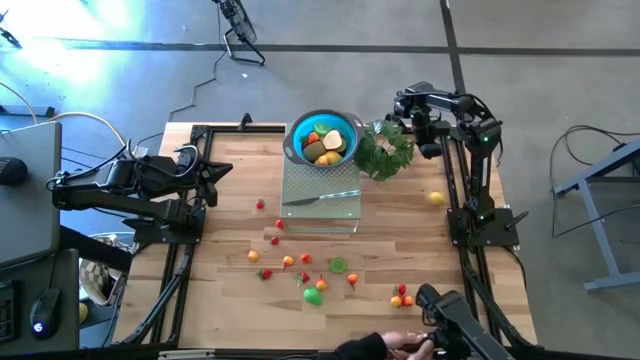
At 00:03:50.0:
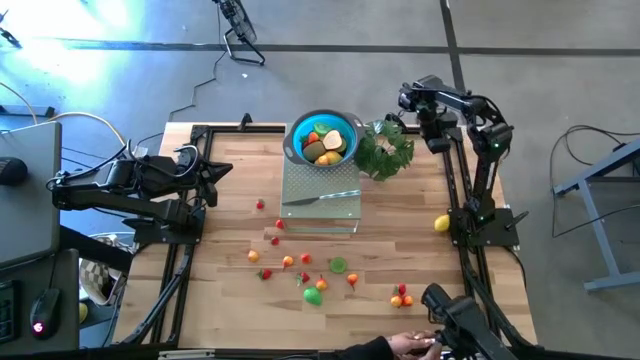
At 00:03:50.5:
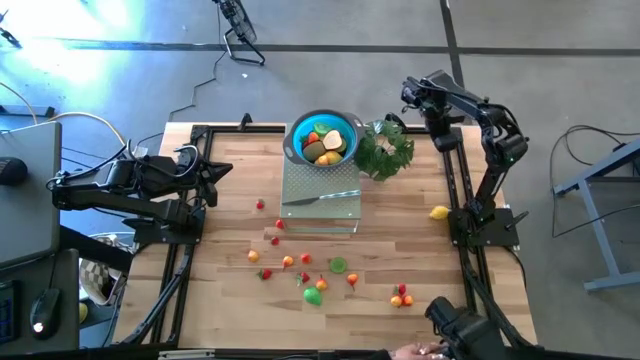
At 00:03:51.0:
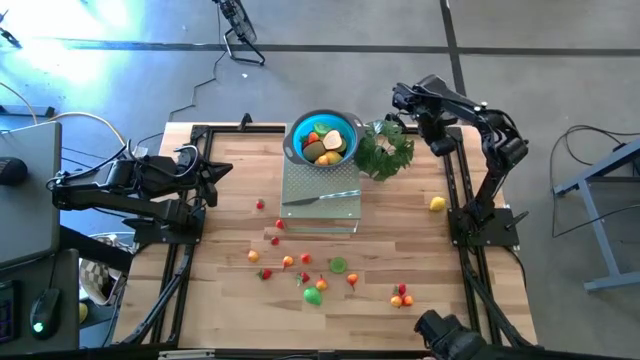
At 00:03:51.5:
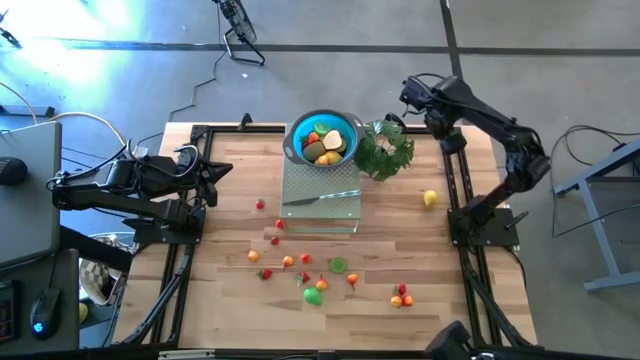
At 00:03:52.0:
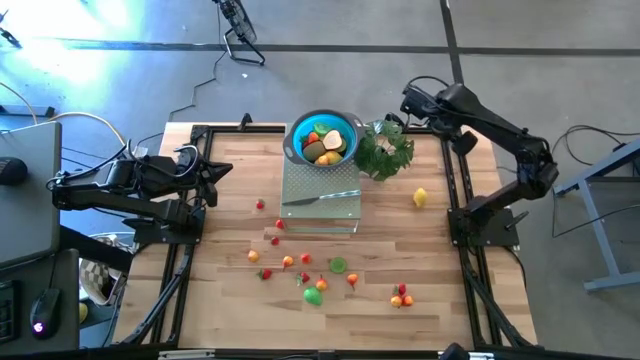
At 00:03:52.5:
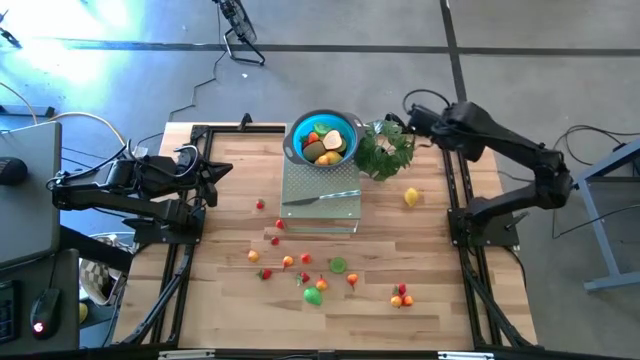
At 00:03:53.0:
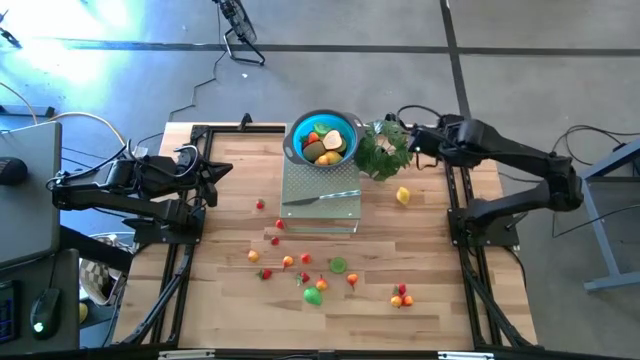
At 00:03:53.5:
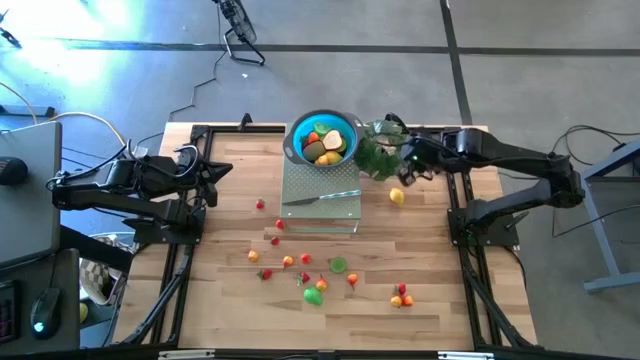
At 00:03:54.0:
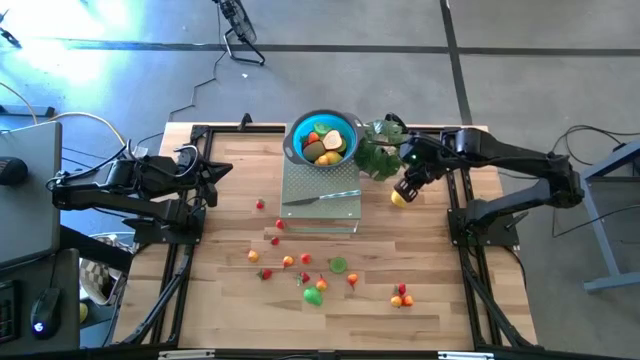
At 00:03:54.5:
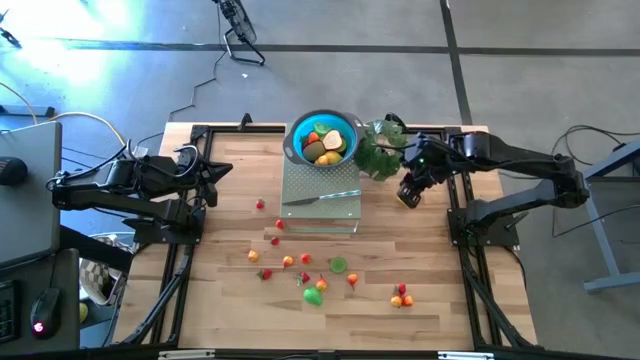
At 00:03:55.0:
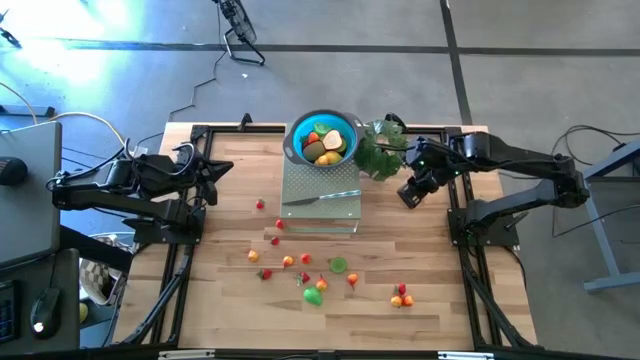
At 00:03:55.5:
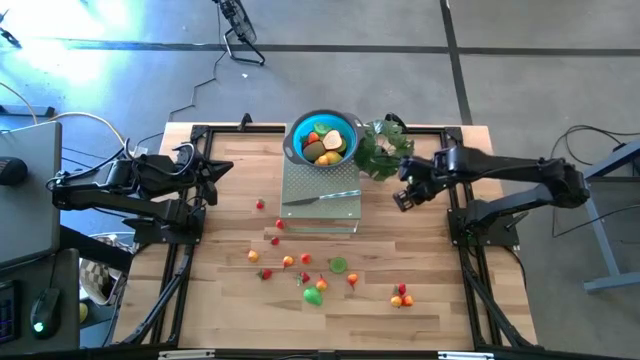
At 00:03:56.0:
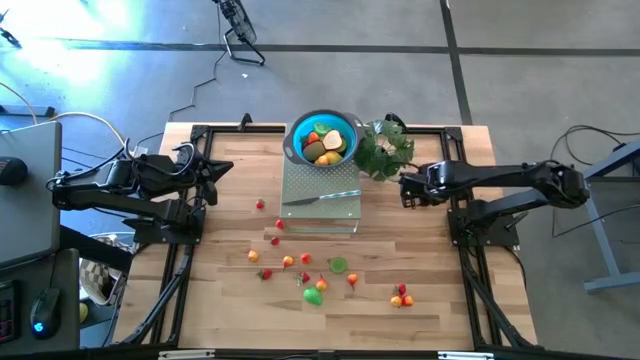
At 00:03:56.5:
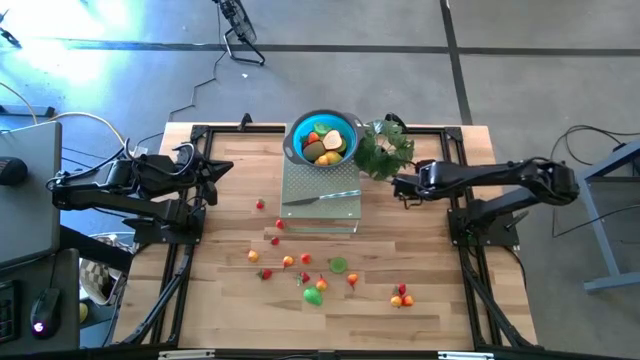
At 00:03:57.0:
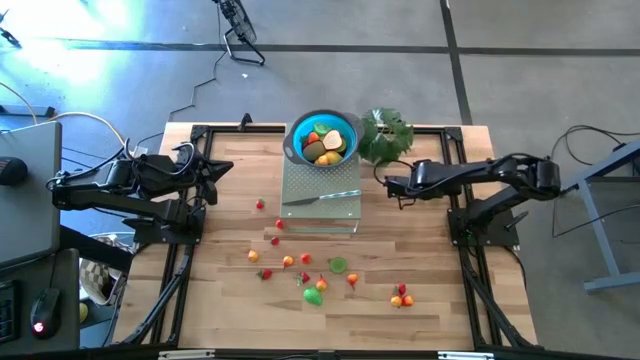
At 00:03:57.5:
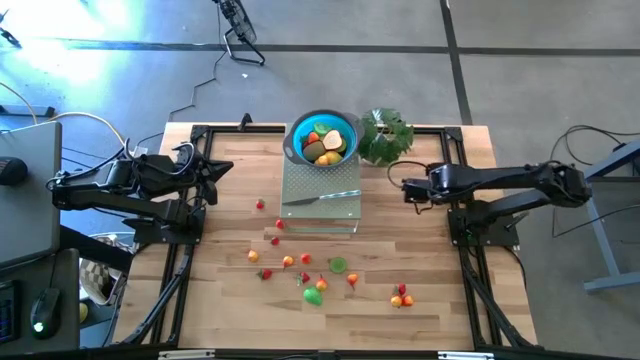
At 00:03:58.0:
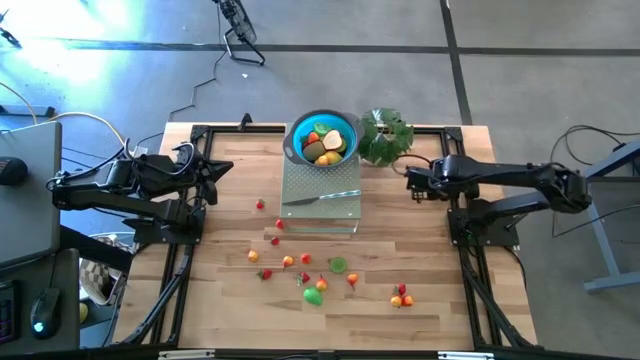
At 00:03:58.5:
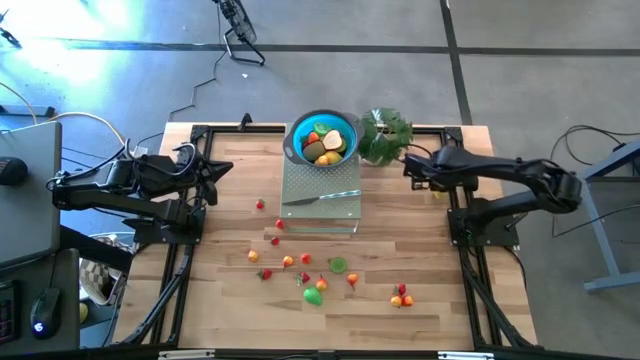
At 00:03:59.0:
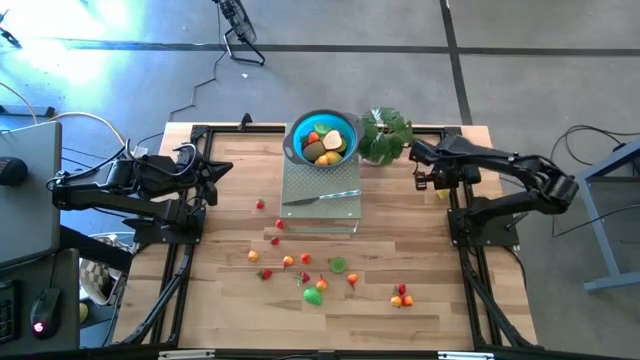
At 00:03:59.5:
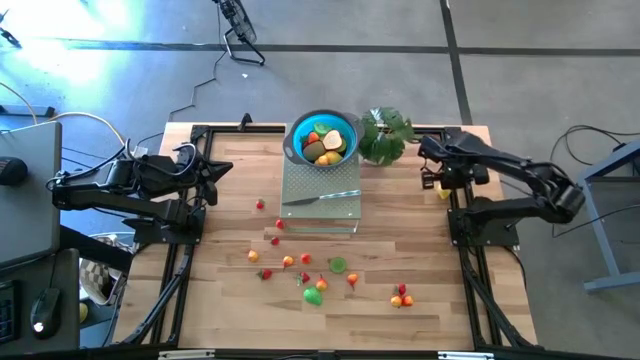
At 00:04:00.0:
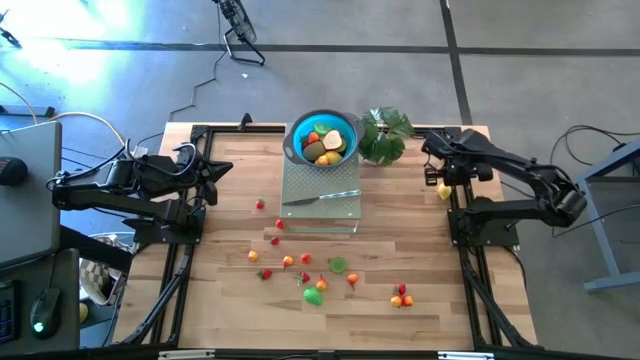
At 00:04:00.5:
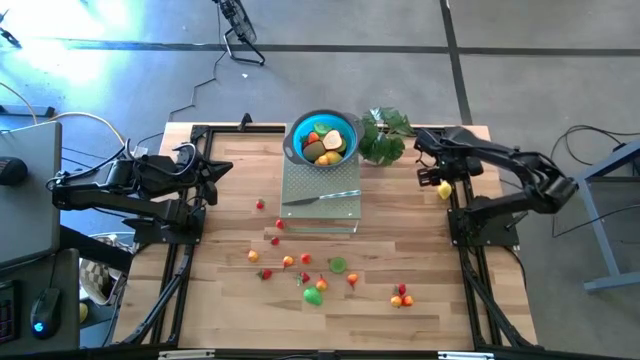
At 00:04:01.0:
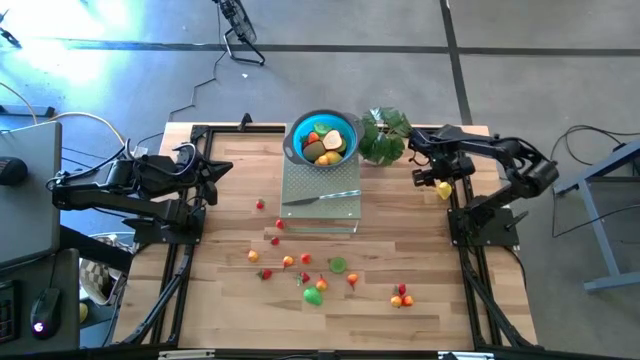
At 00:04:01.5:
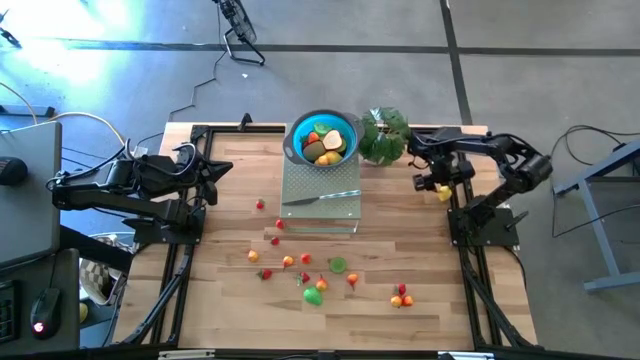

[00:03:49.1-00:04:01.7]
Task: Pick & Place Fruit
Put the yellow lemon in the blue bowl on the shelf

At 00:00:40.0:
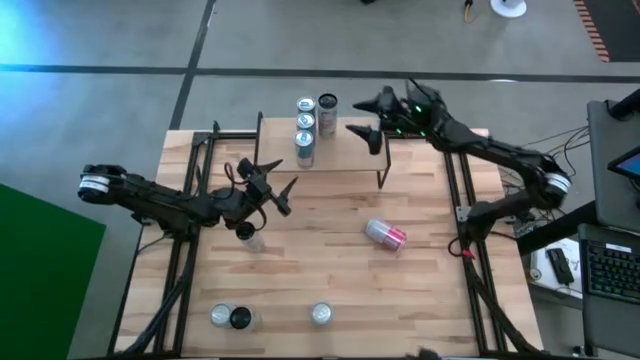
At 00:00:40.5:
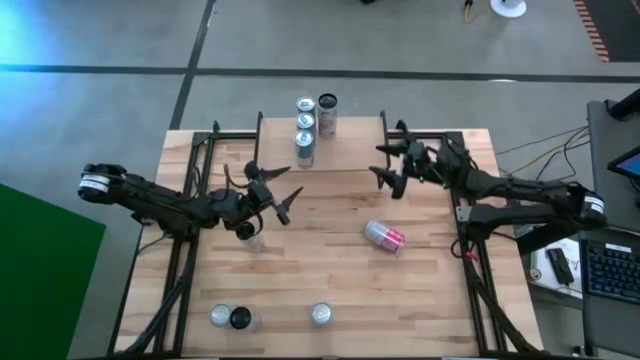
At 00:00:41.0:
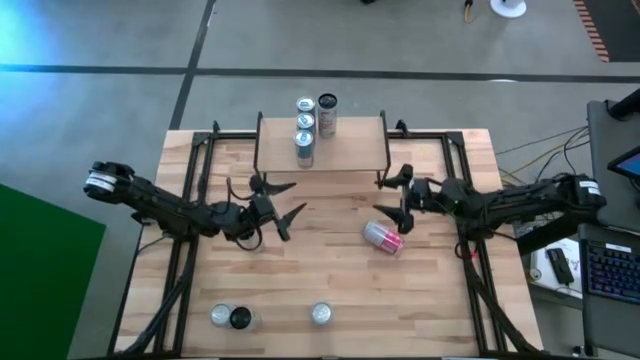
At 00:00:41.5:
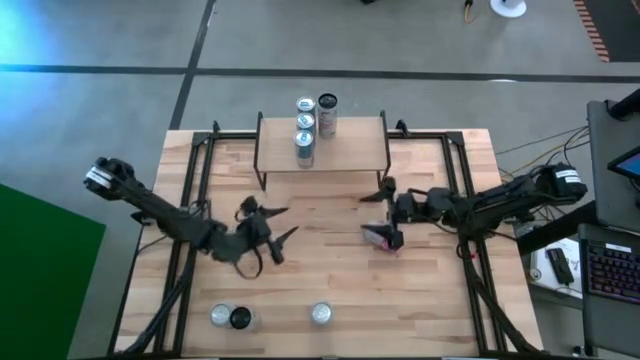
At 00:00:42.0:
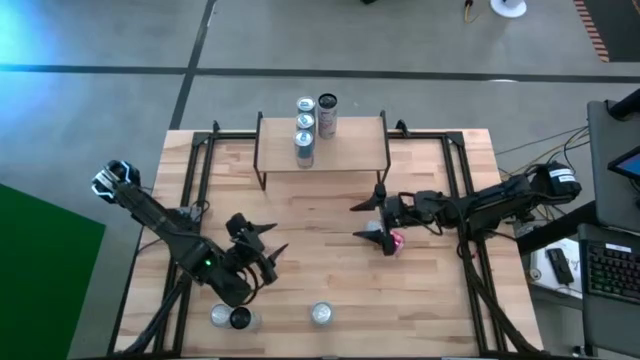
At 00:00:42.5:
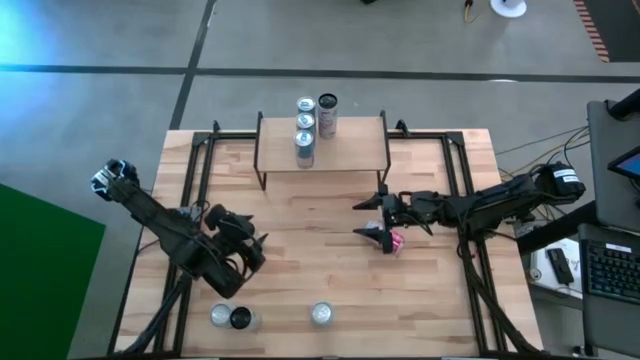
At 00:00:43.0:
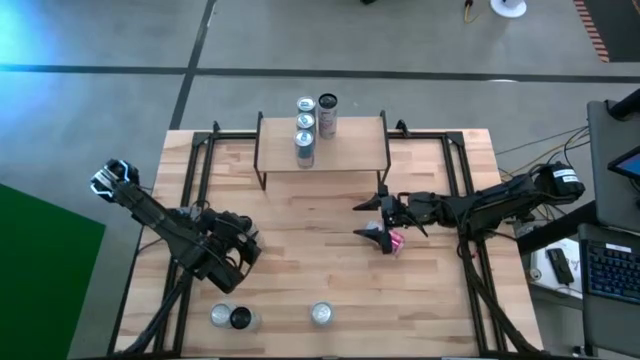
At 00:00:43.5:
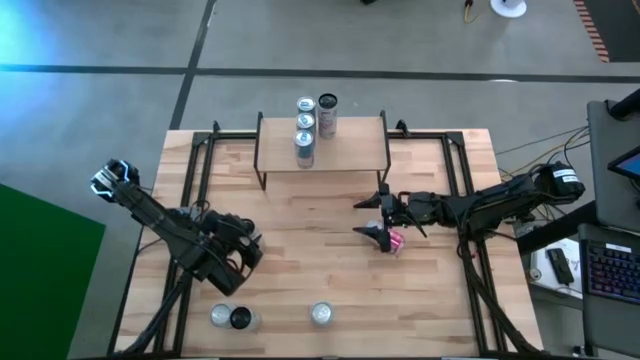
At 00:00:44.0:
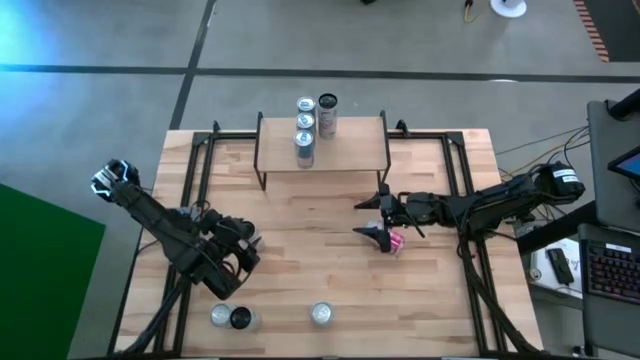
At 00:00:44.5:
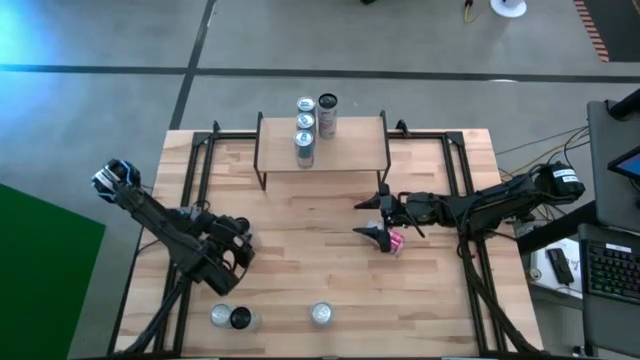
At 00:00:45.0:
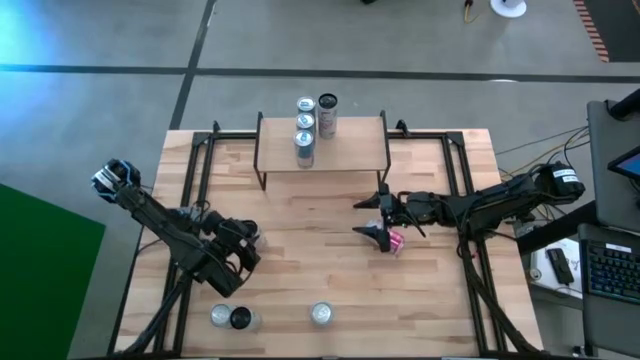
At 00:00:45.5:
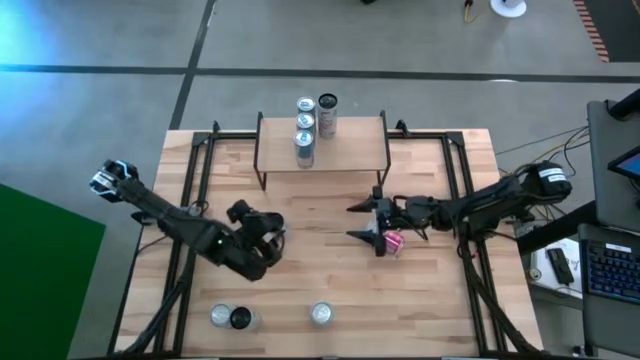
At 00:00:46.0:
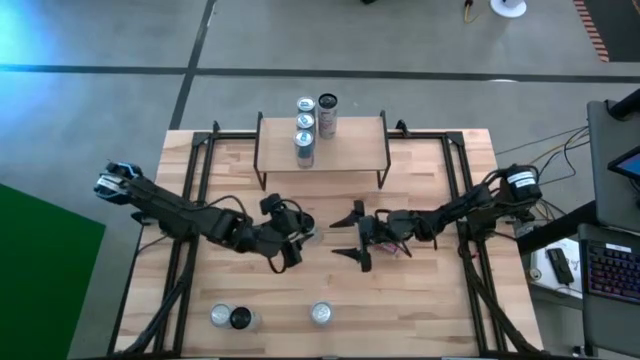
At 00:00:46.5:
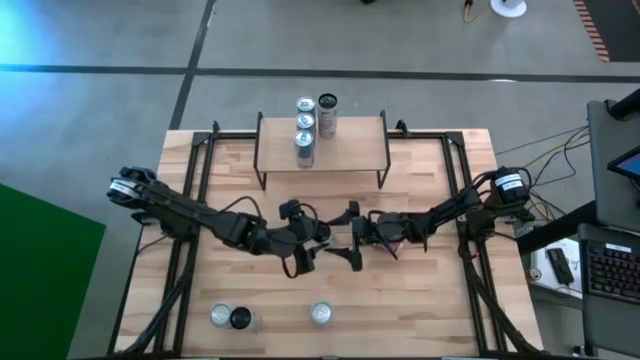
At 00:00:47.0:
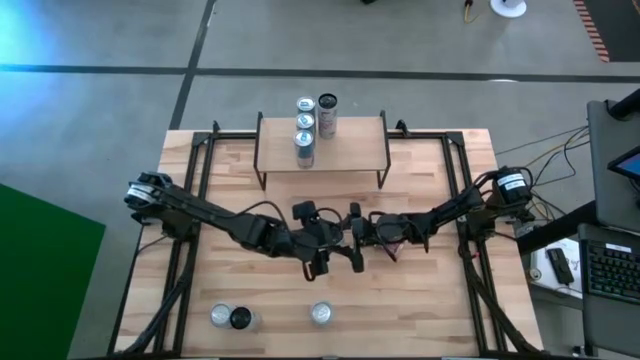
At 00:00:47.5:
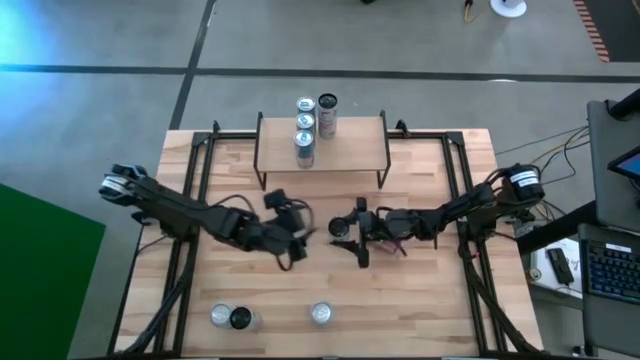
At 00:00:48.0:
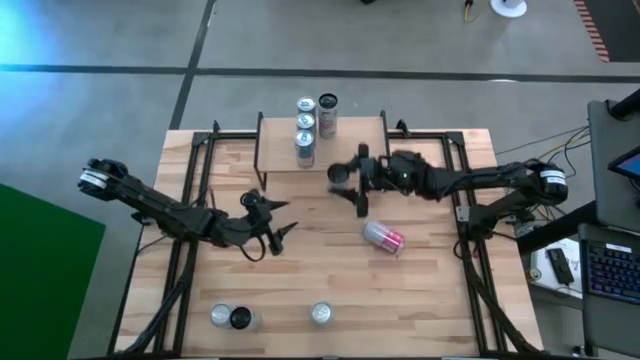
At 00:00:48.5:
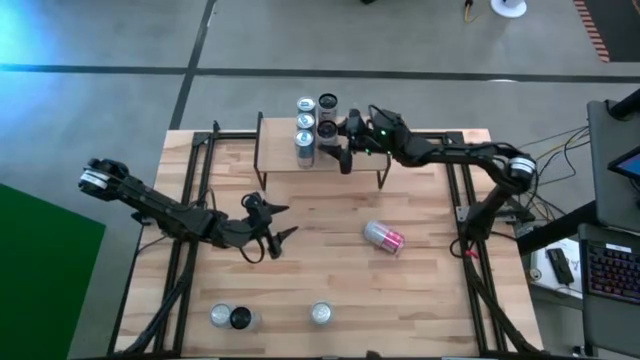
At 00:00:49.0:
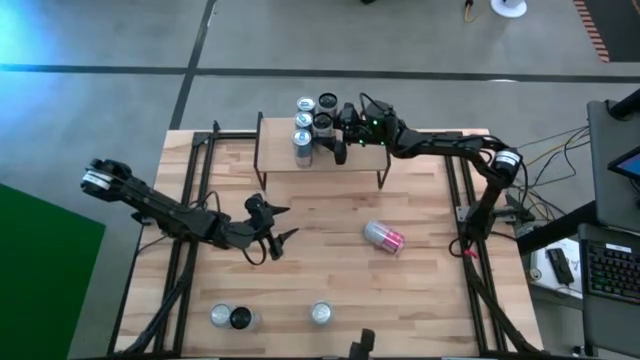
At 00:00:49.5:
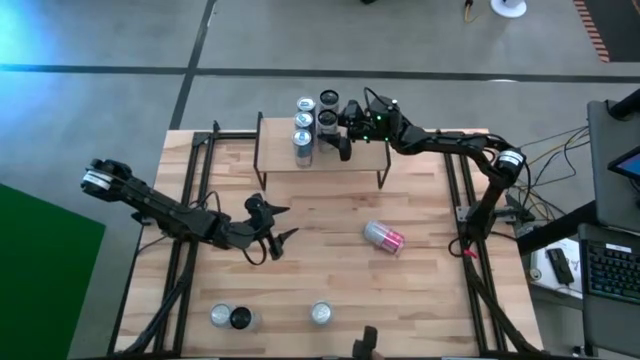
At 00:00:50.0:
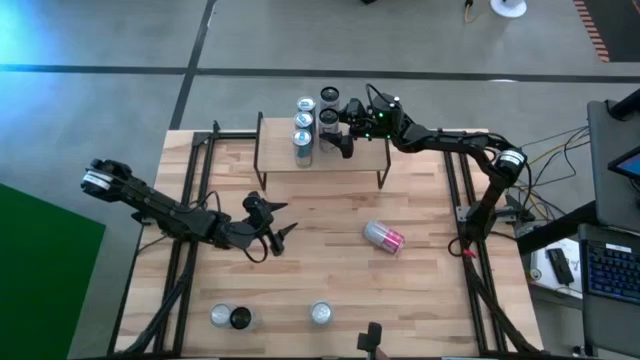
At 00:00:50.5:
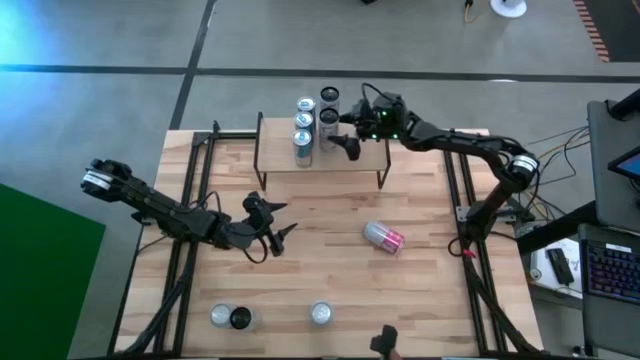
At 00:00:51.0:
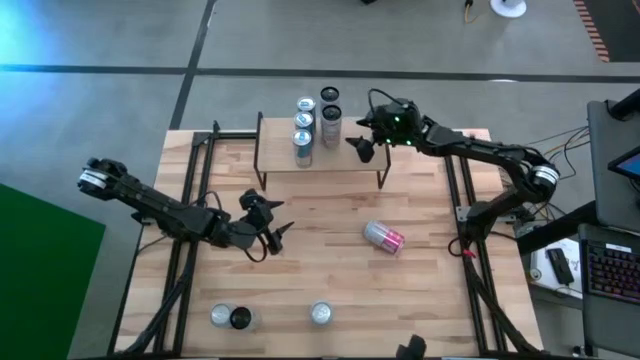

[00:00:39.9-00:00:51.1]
Task: Place canned beverage on shelf
Align the top left white-pink soda can with the other white-pink soda can on the shelf
